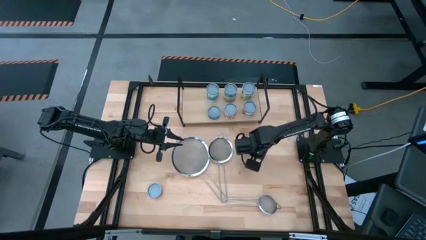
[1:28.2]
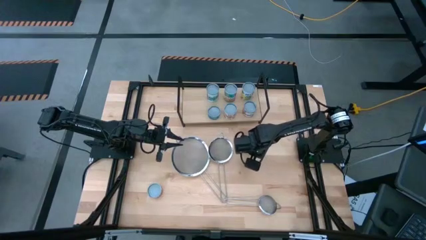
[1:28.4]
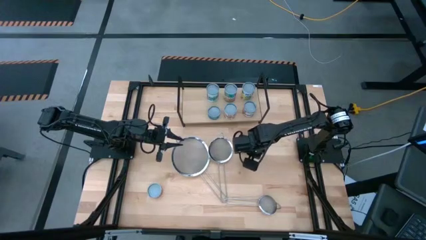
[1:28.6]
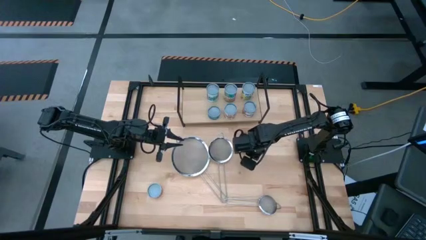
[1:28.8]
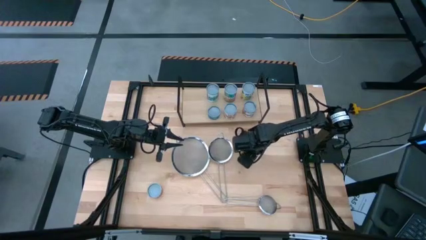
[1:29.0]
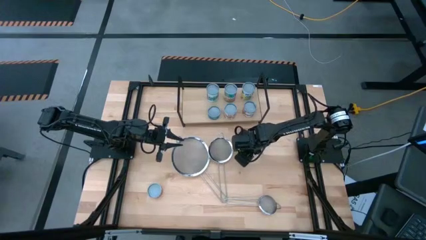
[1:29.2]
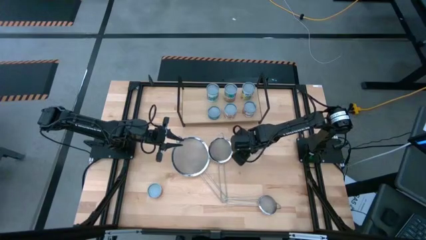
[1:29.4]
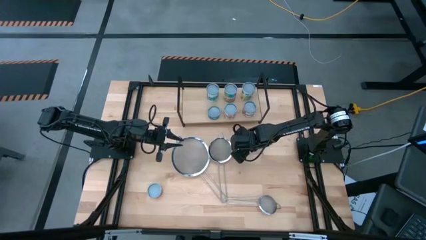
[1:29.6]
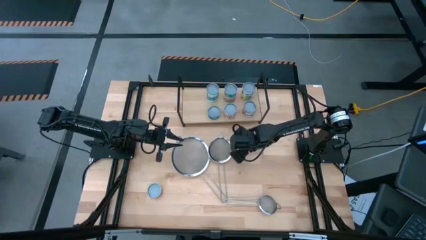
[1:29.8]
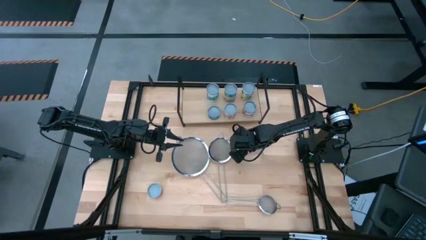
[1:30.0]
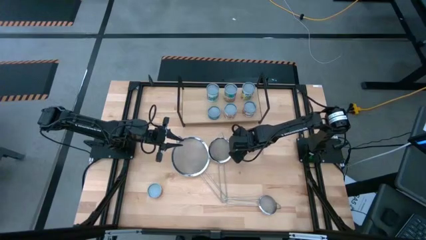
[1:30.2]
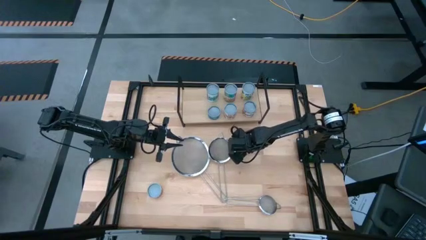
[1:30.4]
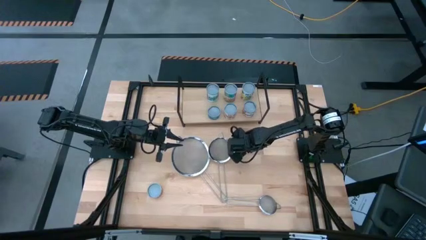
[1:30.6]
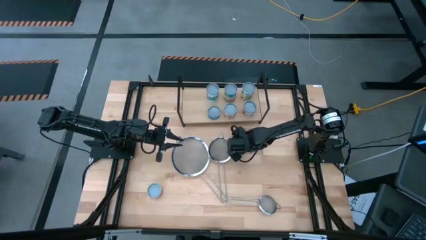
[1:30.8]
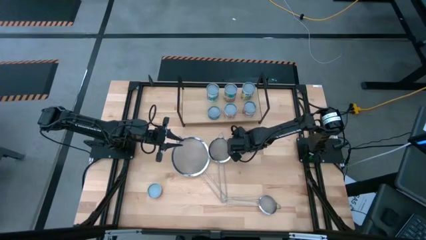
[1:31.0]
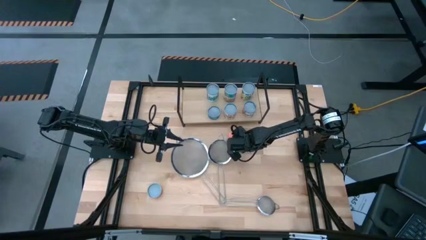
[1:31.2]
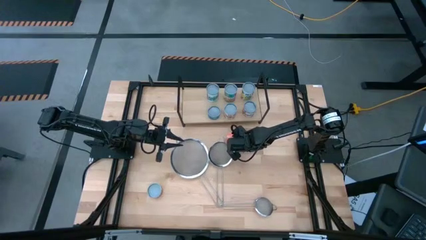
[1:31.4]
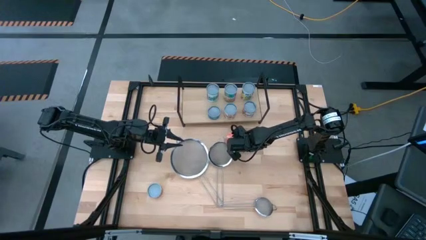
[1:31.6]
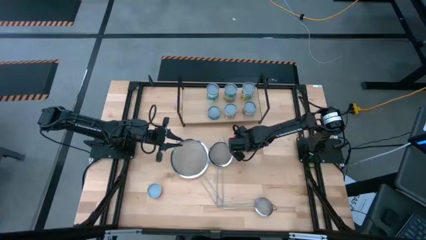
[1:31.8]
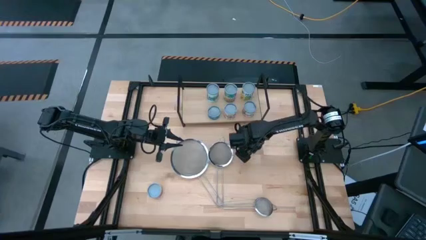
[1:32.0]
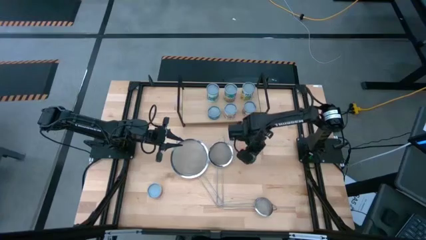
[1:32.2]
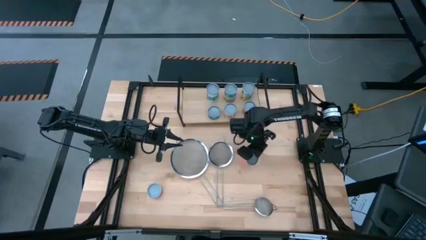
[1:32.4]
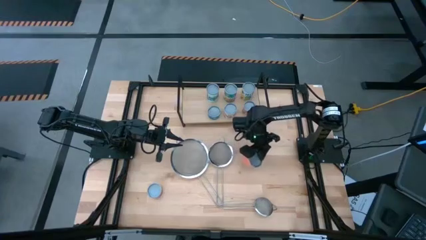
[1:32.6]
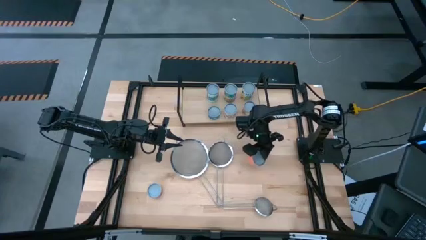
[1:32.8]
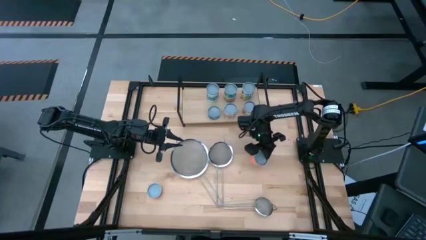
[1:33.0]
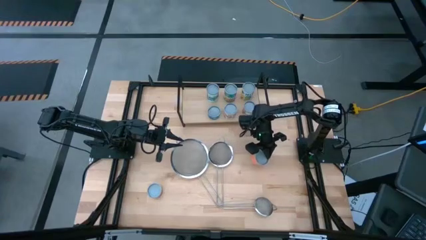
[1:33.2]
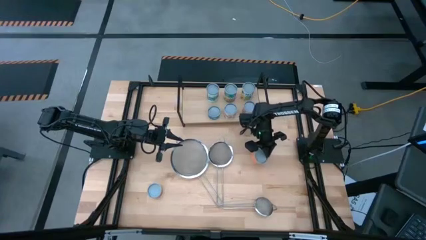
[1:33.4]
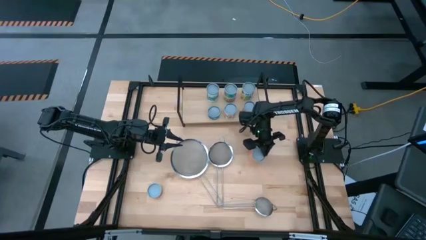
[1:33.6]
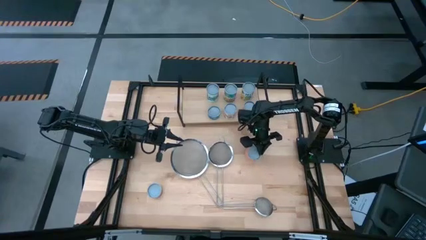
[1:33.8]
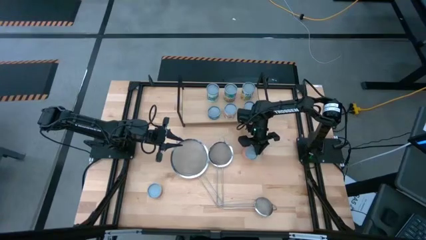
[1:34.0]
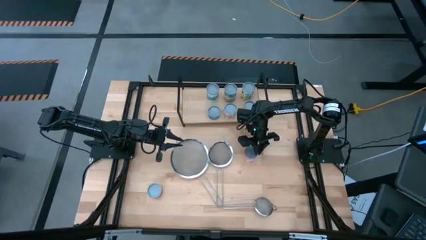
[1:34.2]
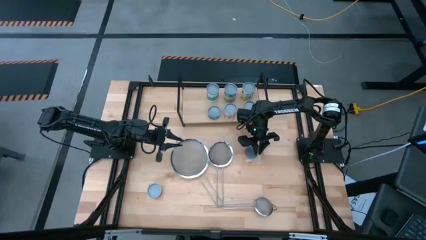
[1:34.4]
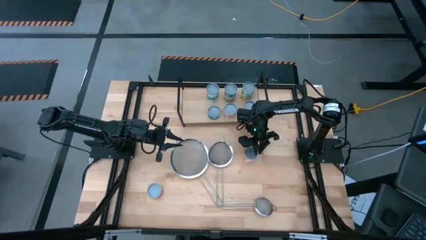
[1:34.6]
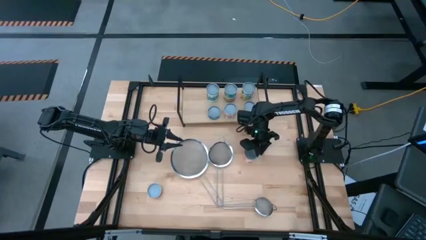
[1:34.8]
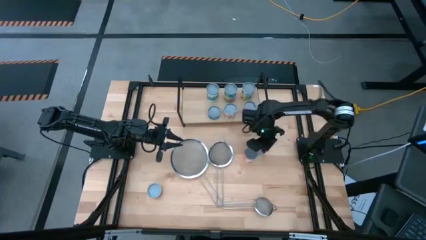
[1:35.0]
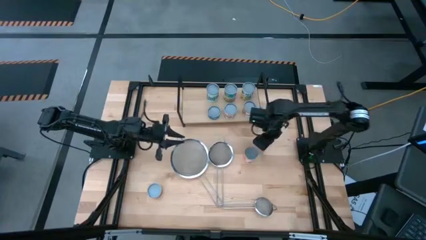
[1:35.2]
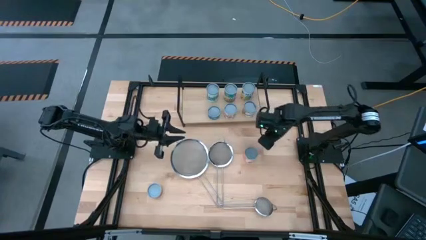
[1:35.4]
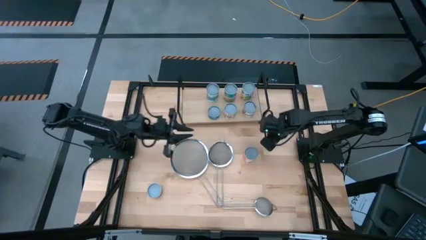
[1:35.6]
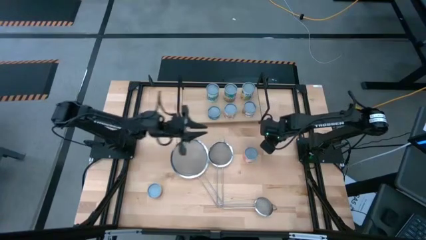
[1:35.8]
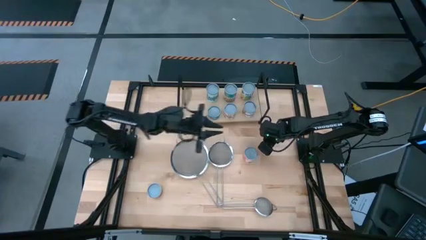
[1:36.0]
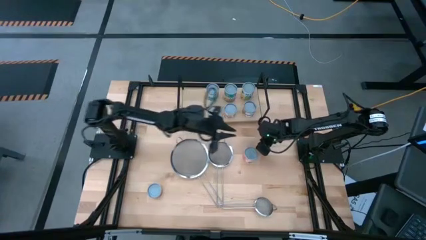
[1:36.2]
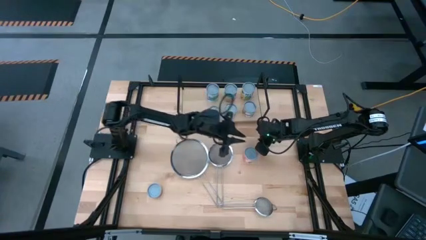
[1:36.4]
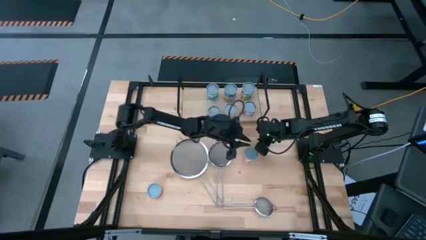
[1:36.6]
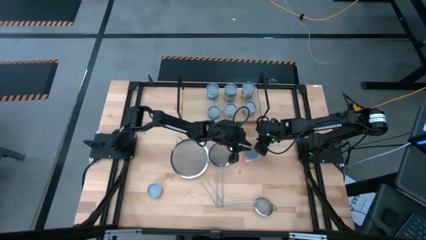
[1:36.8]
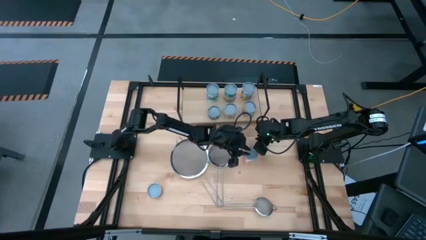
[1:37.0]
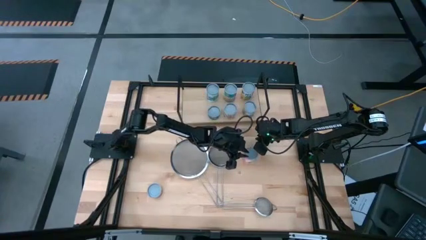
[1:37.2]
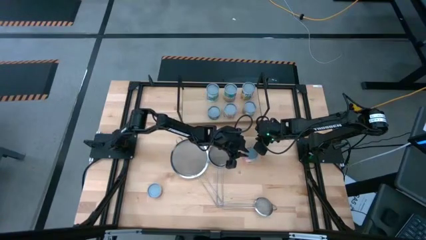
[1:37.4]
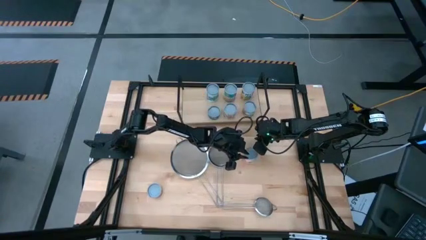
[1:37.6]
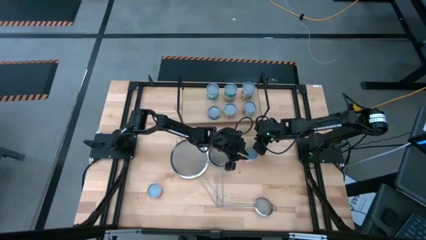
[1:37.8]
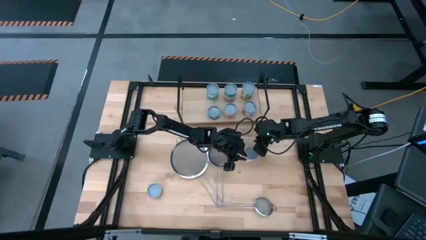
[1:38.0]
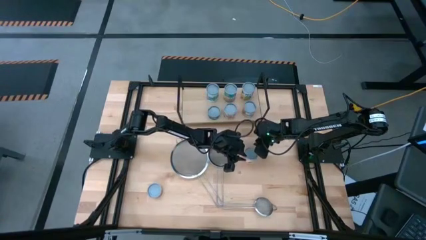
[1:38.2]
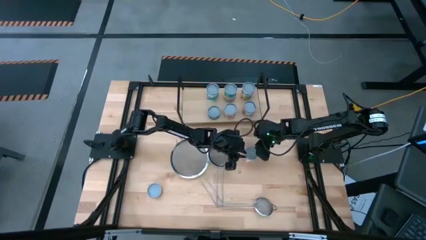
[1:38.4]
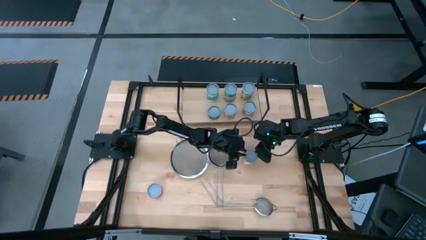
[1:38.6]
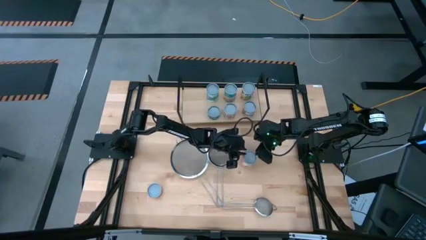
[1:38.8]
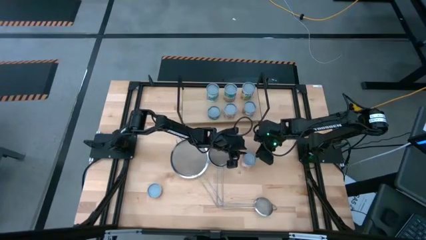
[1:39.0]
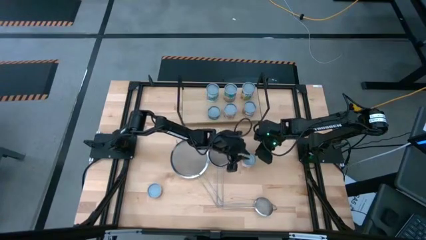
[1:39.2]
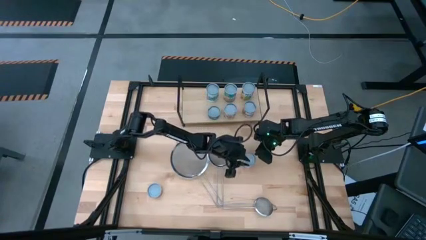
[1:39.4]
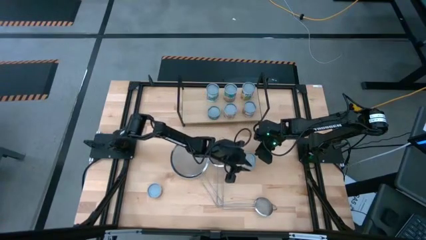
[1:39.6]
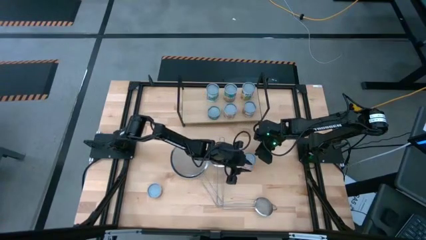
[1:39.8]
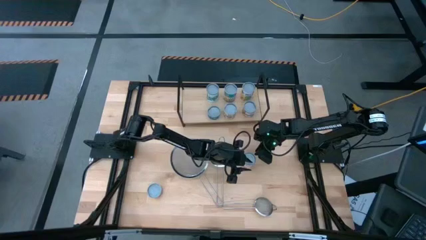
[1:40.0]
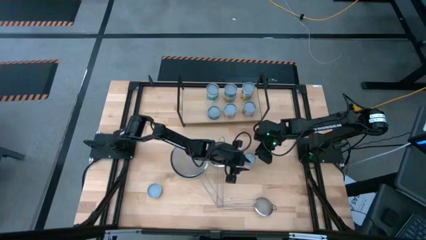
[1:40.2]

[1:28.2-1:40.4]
Task: Pick and place cans onto a shelf
Put the canned meatballs on the shelf

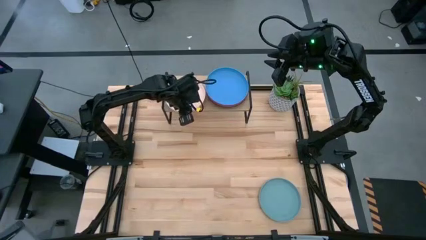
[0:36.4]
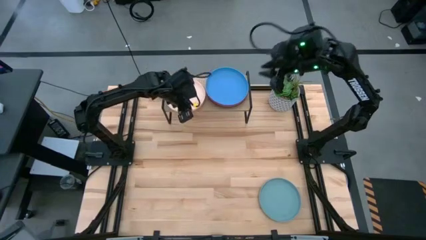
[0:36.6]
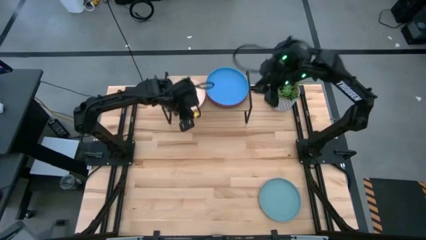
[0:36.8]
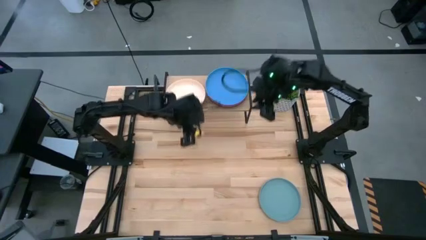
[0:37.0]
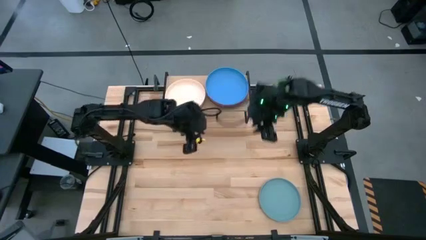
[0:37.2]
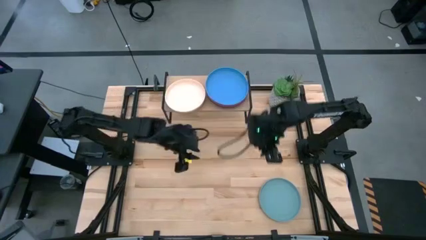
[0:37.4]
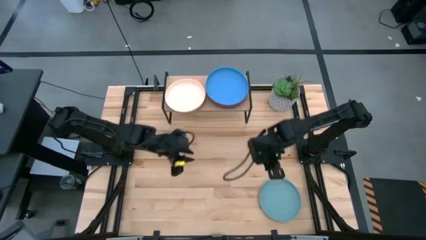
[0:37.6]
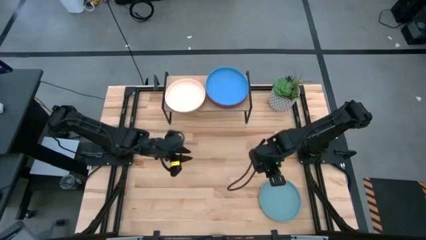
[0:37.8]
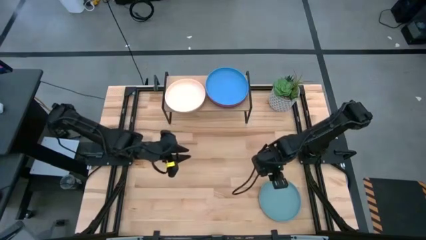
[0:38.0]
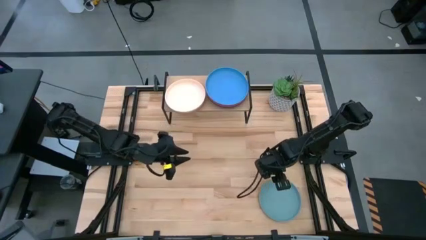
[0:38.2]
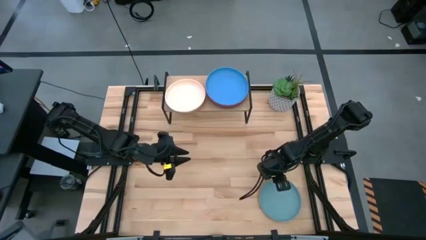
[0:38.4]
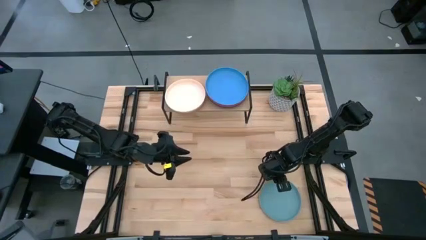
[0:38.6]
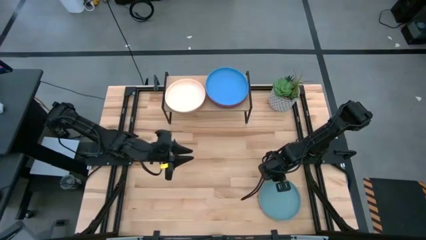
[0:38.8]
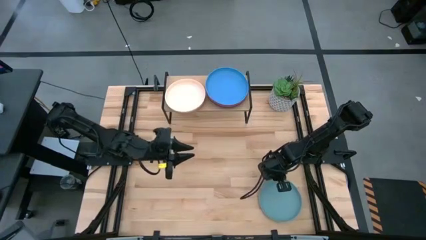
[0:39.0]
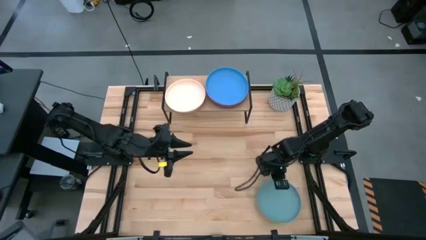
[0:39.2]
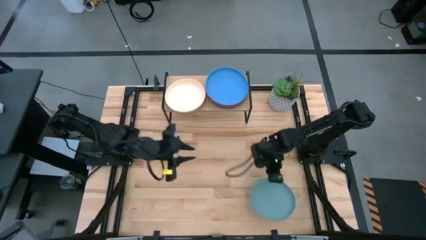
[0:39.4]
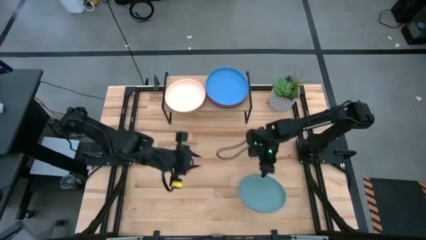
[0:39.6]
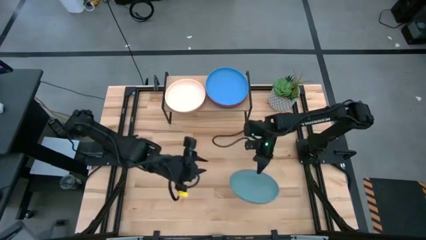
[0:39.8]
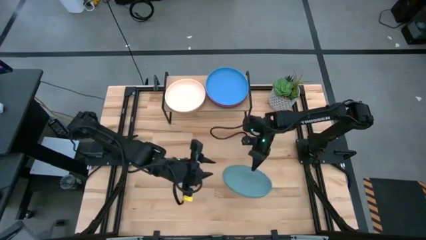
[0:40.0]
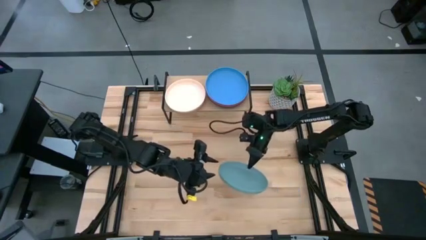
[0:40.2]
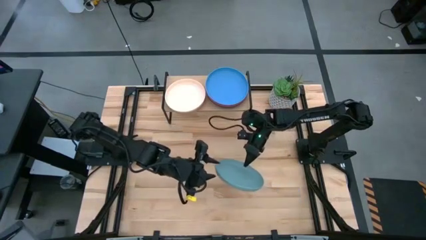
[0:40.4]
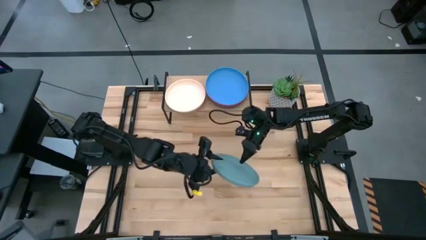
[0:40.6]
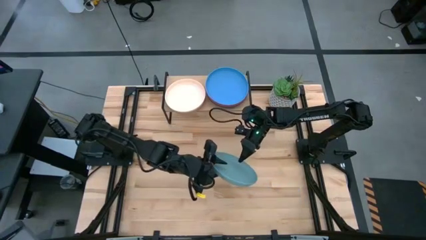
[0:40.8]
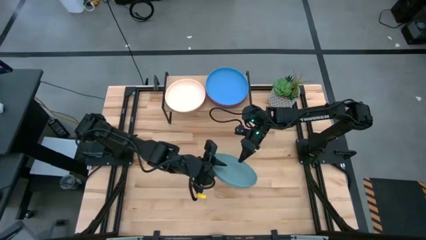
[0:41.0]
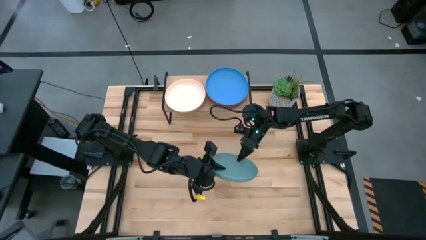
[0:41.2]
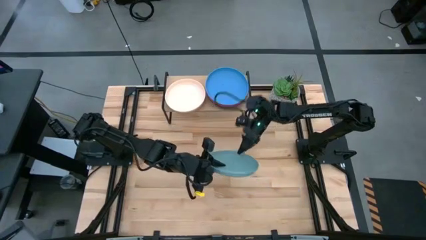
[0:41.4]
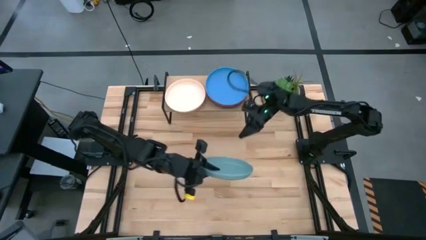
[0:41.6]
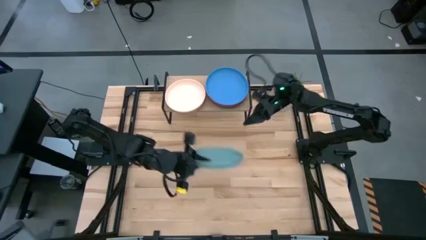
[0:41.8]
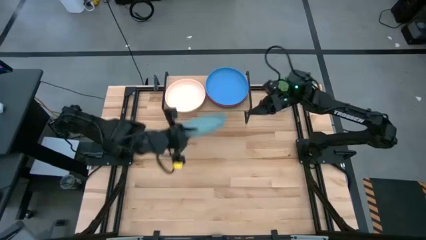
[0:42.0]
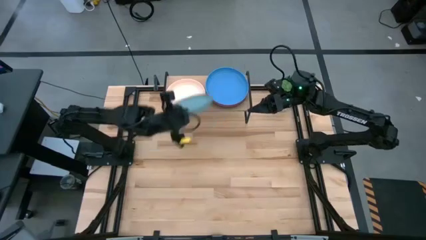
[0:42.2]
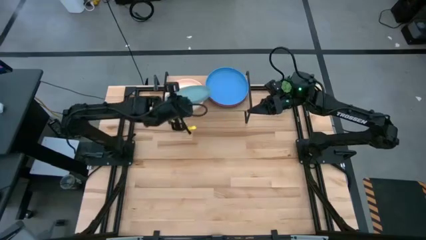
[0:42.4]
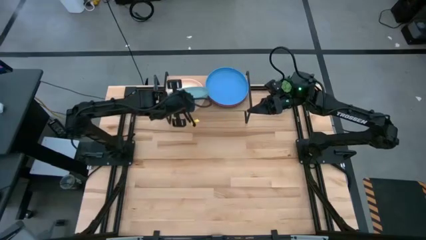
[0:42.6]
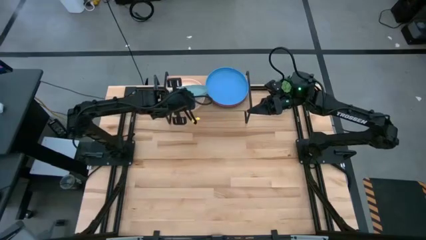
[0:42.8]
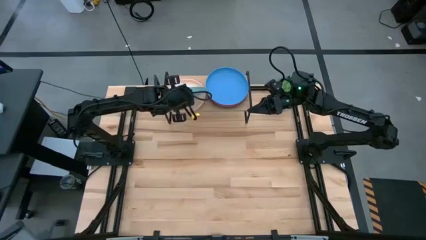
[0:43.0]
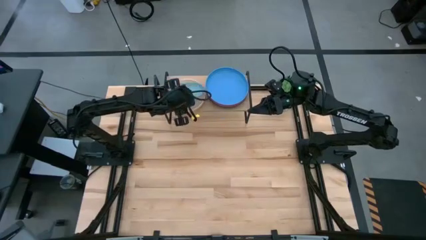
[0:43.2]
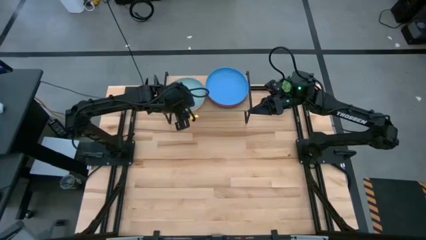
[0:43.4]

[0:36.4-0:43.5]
Task: Place and stack plates onto a shelf
Stack the light blue plate on top of the light orange plate on the shelf
